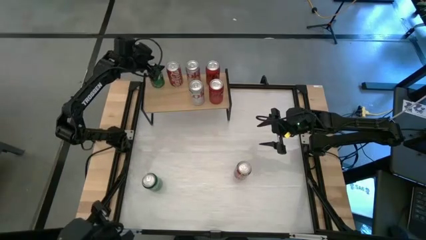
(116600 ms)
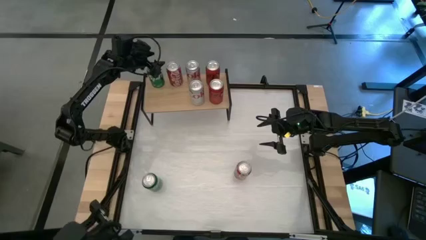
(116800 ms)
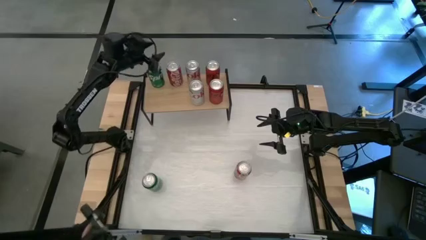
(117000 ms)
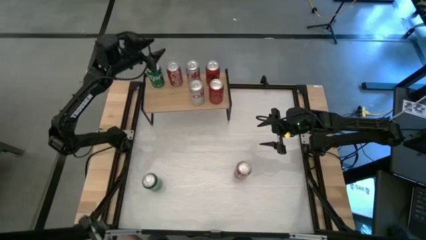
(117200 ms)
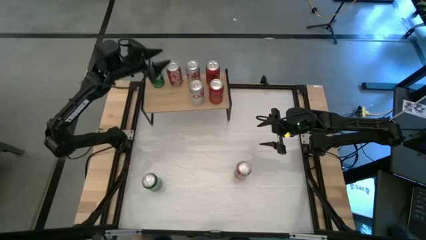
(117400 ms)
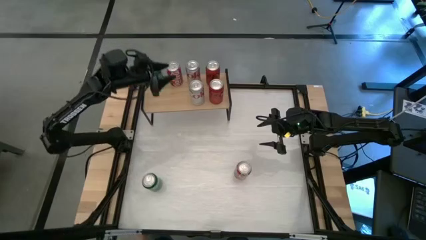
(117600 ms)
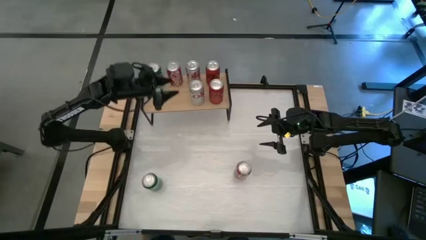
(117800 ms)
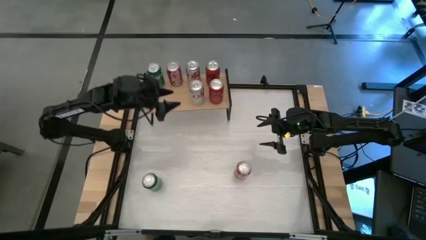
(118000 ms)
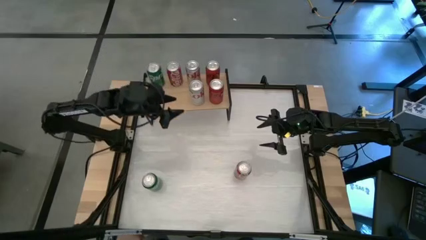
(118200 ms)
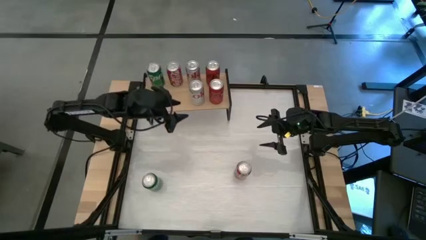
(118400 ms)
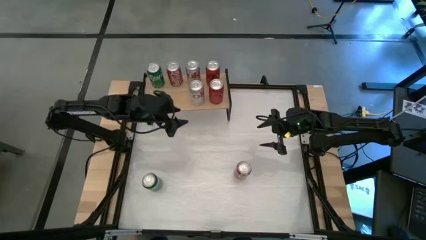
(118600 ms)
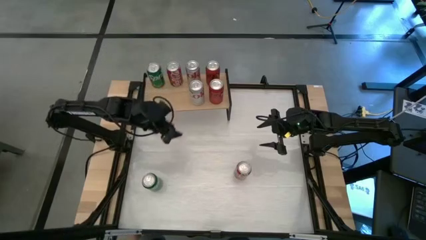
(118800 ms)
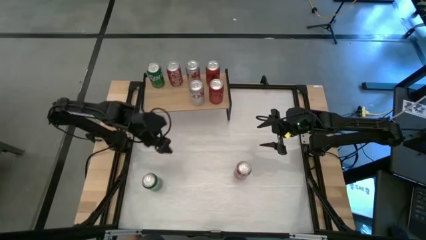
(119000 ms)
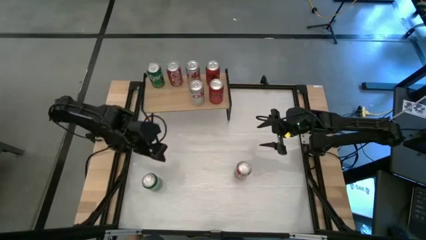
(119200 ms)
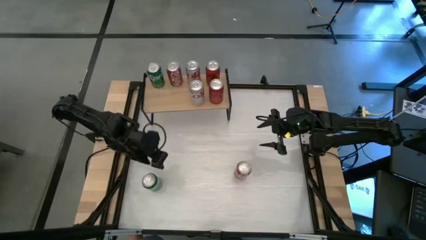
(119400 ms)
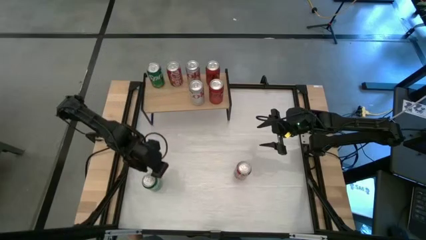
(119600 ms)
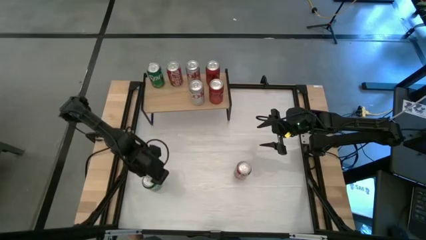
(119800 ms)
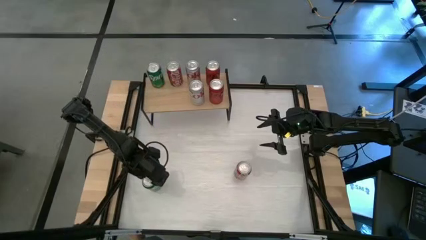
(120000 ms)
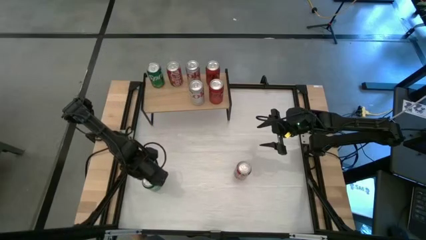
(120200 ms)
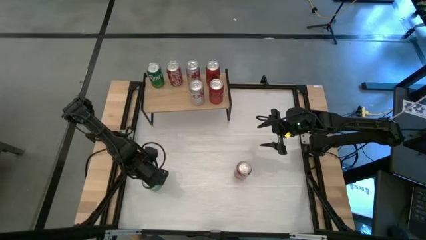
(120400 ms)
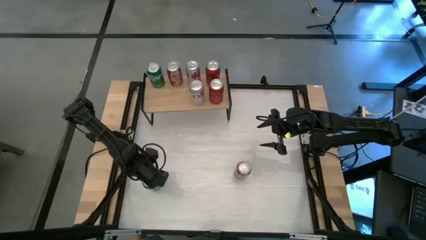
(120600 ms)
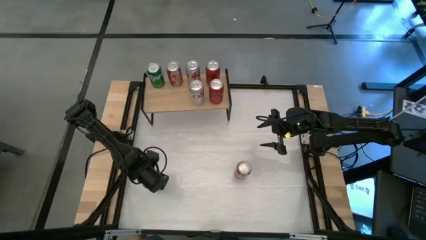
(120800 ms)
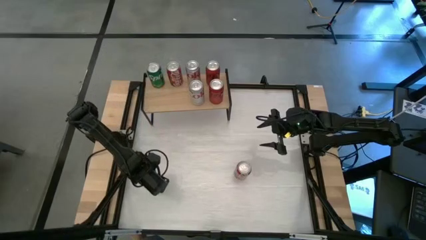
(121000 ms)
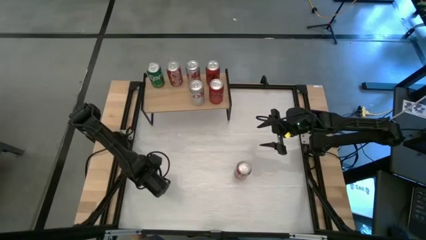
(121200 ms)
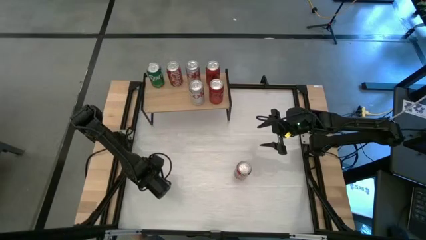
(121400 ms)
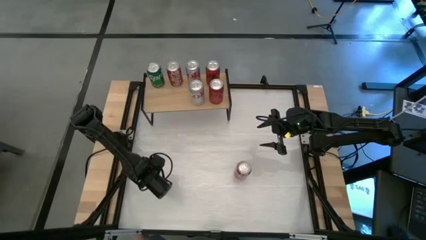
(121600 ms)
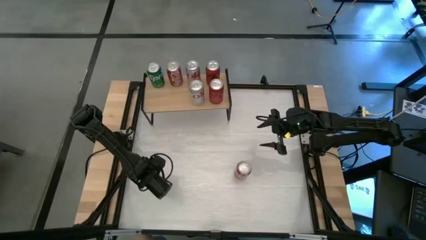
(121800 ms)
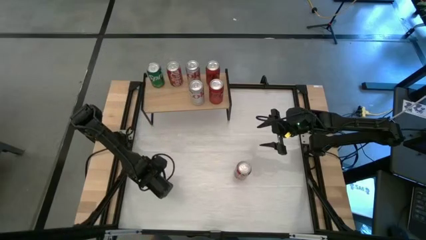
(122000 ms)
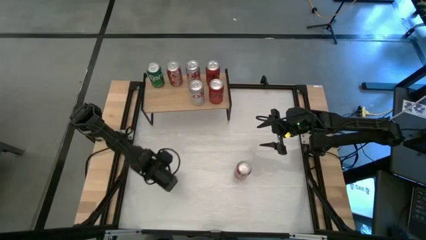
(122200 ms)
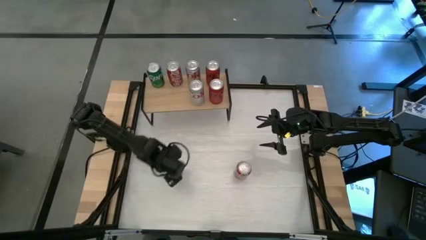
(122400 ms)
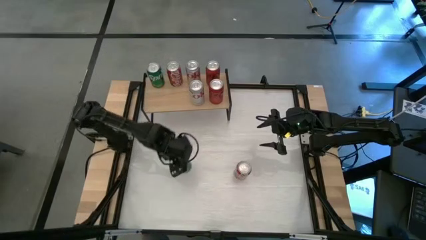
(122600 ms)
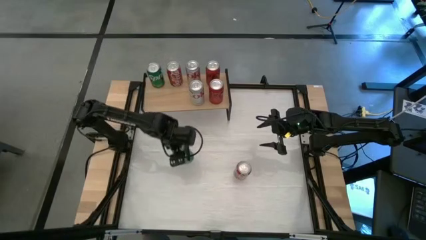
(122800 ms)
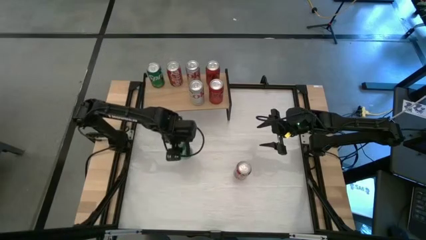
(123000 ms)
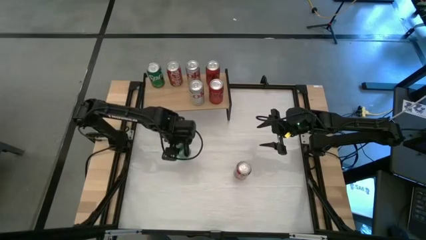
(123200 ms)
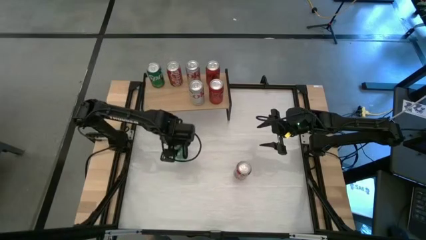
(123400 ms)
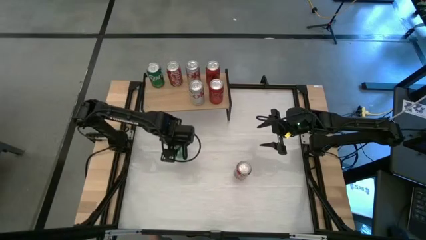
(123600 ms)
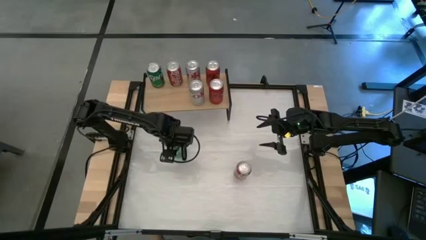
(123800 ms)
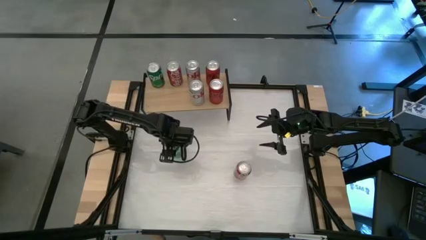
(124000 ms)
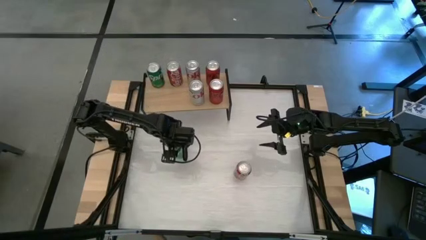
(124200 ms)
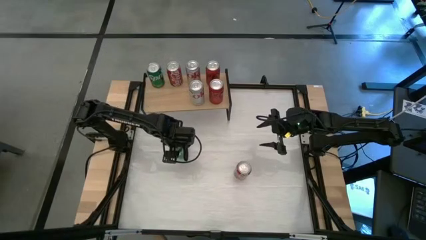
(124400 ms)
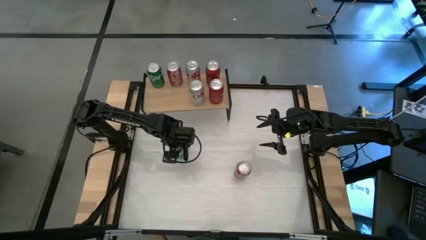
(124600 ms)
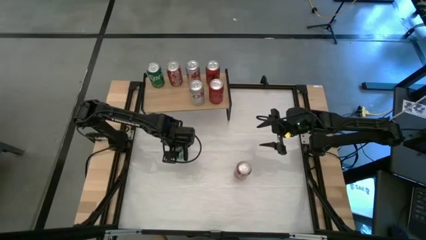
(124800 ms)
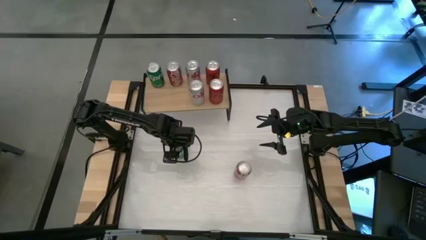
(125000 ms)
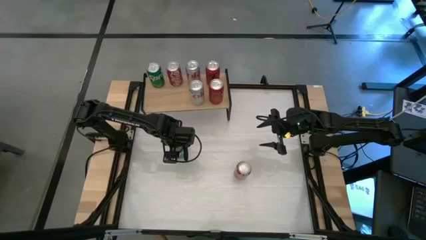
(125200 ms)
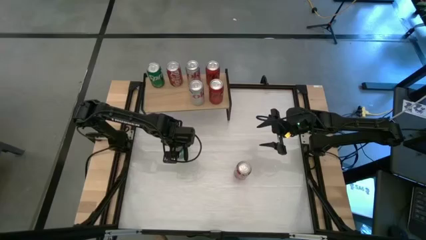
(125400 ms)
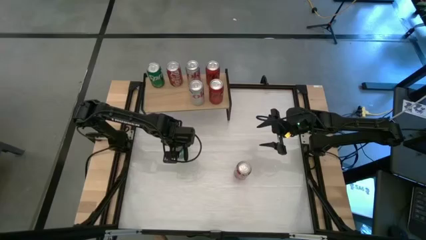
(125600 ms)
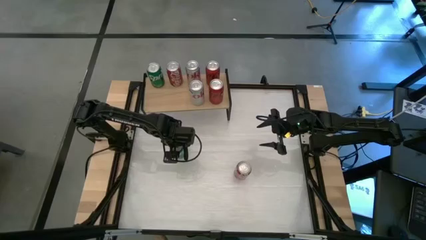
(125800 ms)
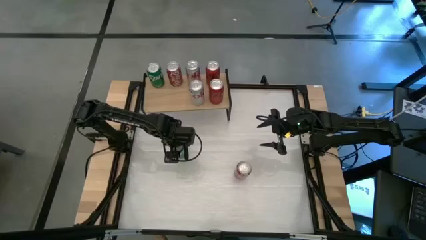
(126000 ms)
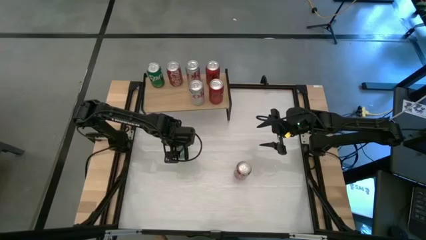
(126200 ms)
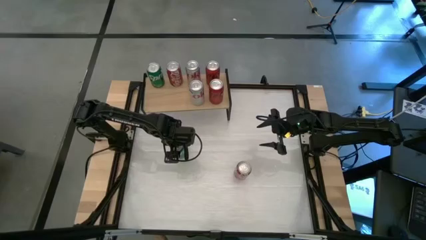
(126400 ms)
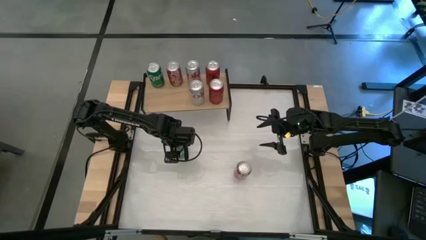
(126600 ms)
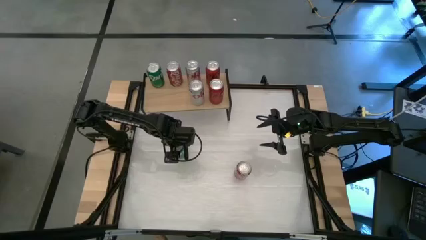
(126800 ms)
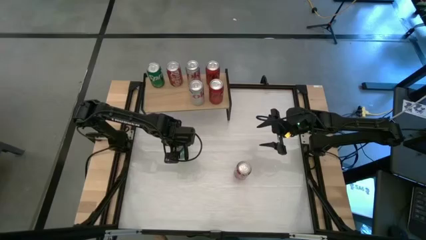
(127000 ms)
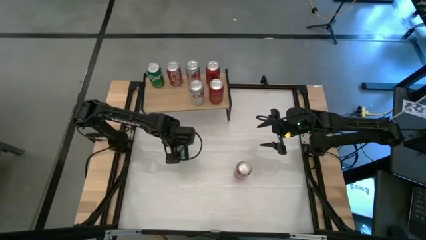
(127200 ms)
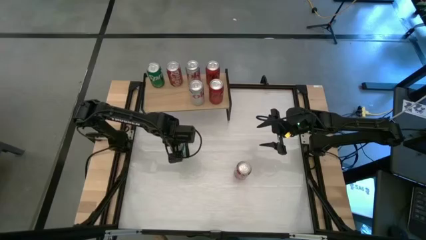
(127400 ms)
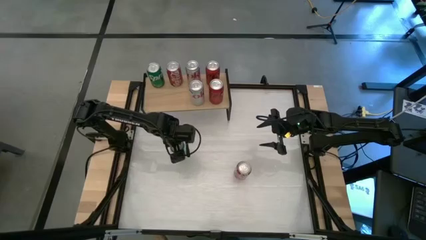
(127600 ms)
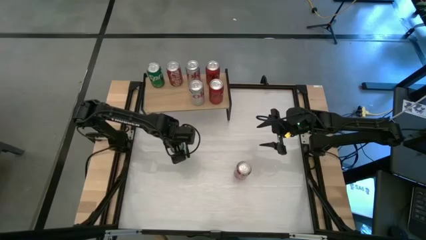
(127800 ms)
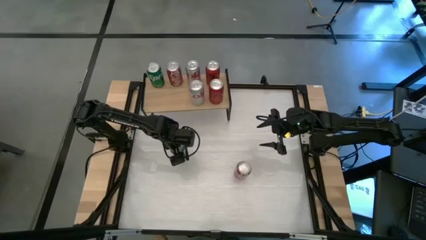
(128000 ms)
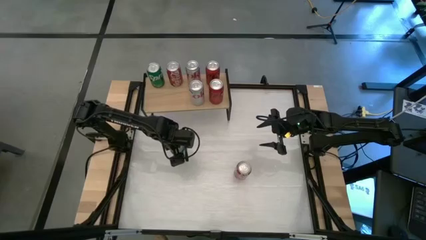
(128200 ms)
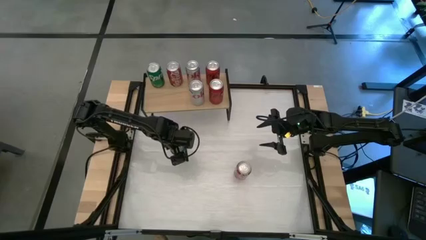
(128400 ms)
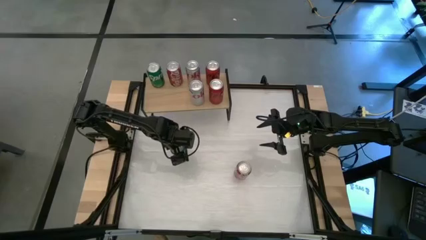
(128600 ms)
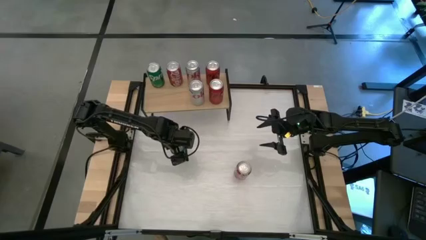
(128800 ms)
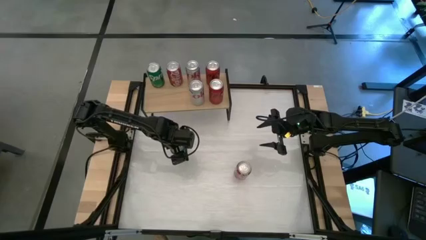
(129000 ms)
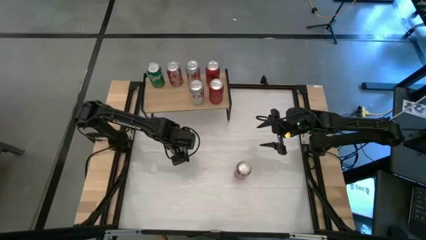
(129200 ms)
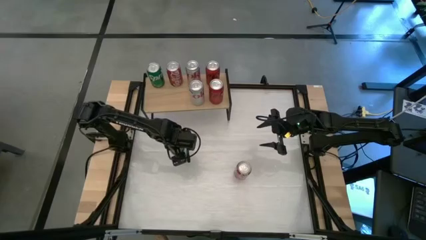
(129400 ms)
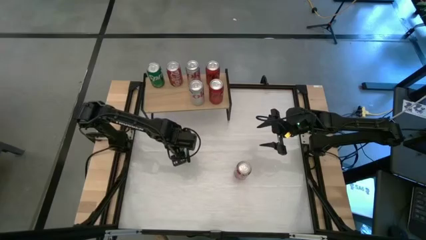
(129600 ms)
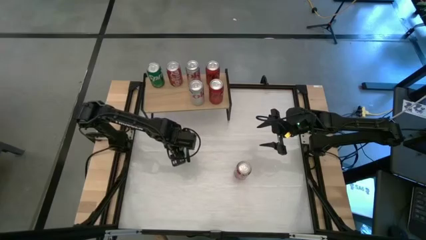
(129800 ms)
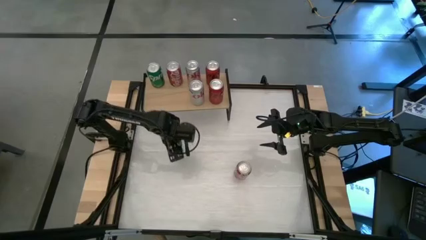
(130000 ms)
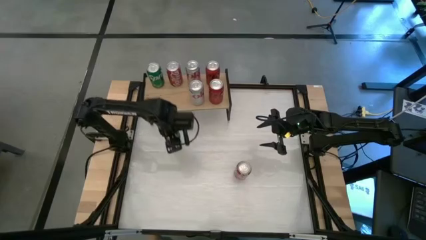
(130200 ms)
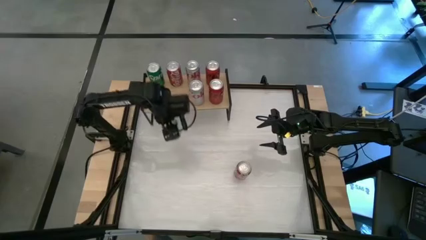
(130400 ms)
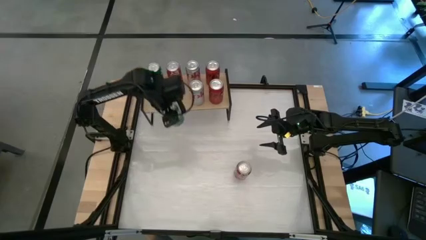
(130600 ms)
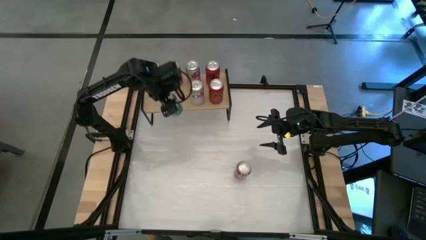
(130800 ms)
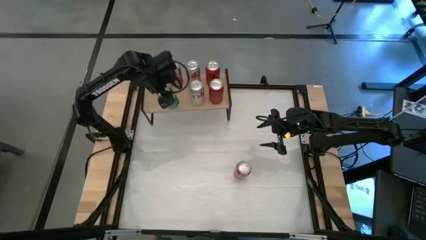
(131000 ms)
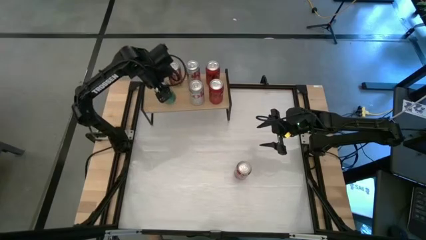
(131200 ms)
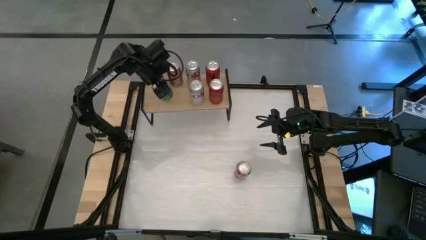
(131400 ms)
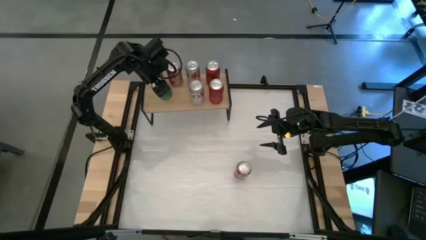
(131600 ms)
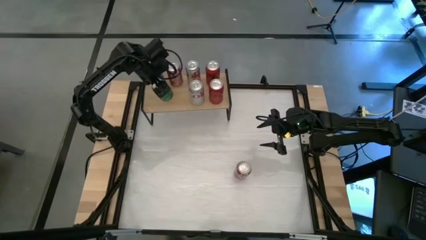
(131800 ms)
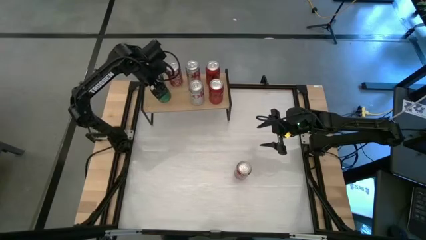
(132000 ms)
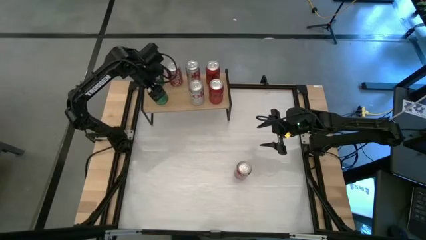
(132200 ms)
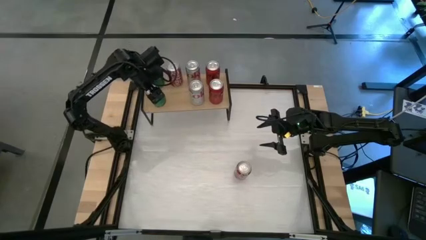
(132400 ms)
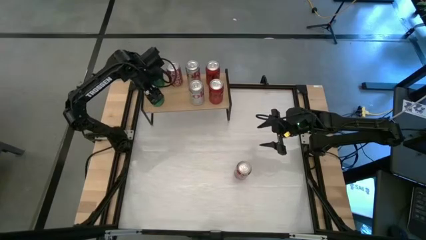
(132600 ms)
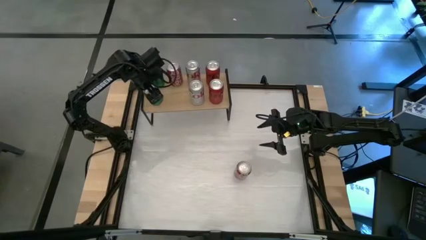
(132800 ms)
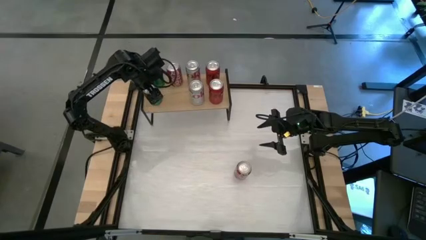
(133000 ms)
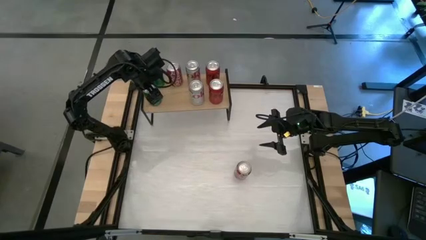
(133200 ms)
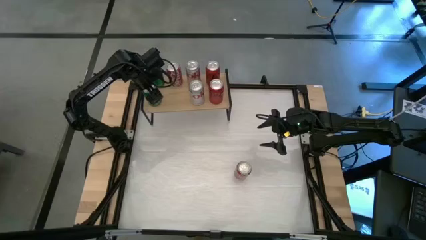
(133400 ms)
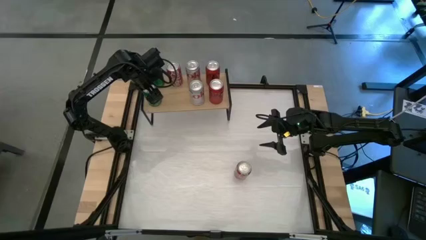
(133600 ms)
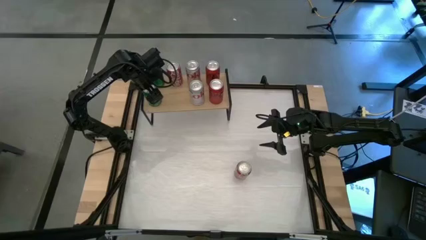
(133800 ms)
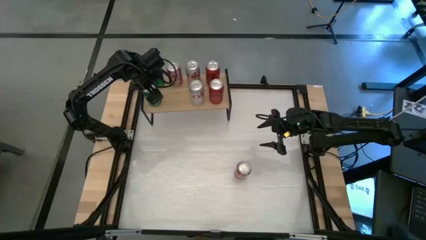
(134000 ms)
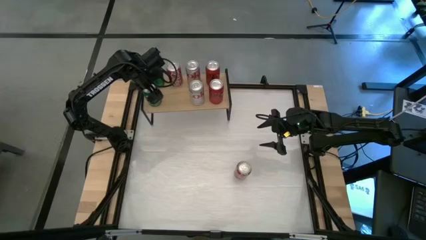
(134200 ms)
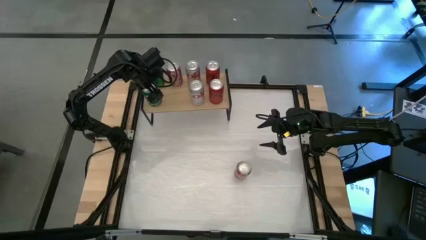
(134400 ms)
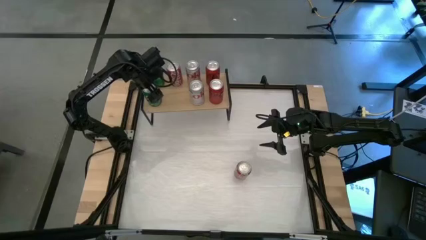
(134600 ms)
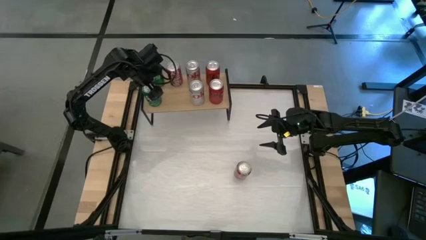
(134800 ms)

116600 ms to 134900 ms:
Task: Place canned beverage on shelf
Put the green soda can on the shelf aligned with the other green soda can
